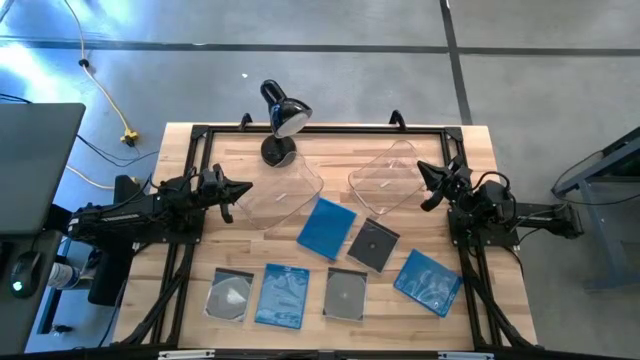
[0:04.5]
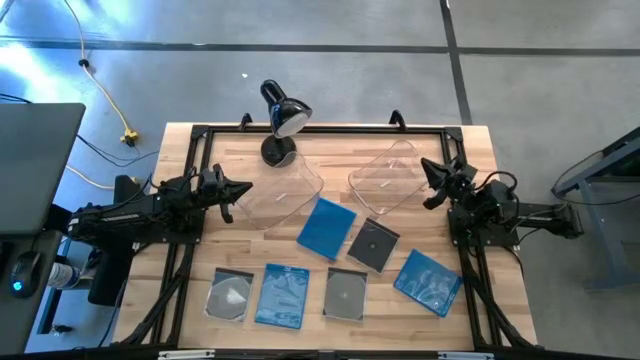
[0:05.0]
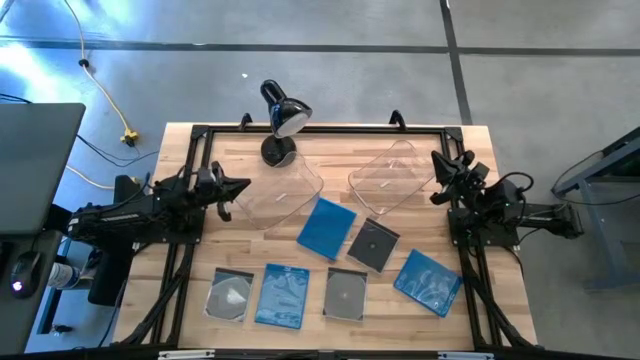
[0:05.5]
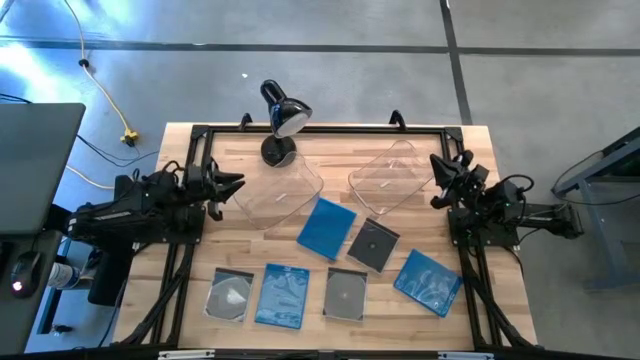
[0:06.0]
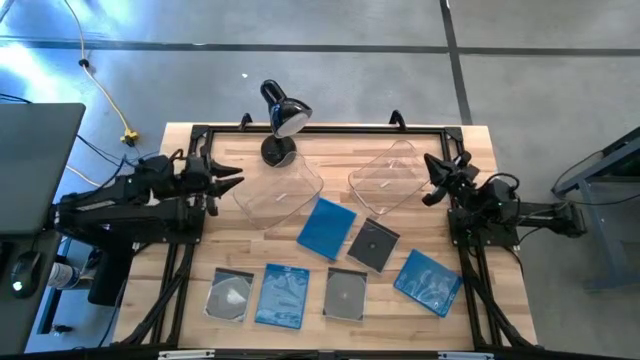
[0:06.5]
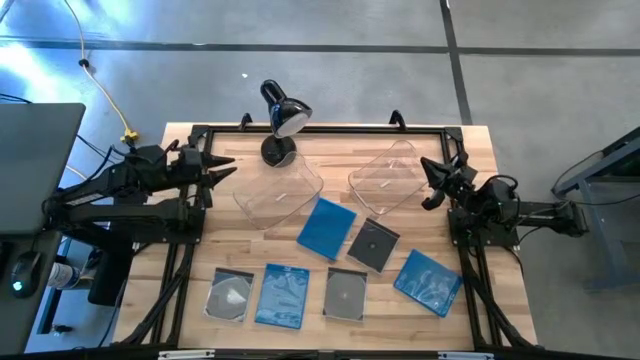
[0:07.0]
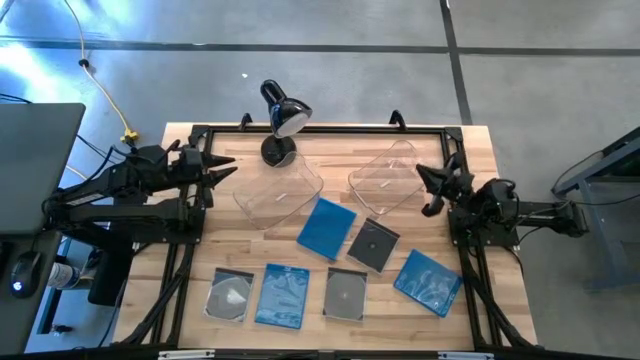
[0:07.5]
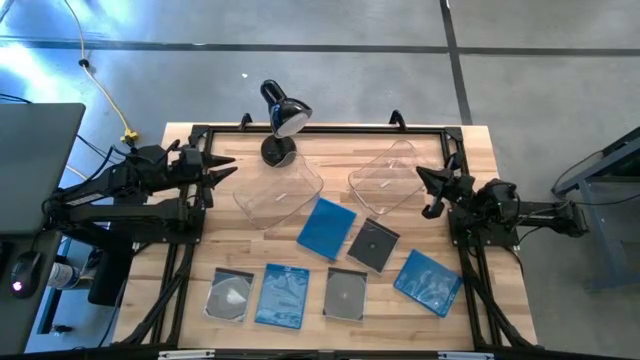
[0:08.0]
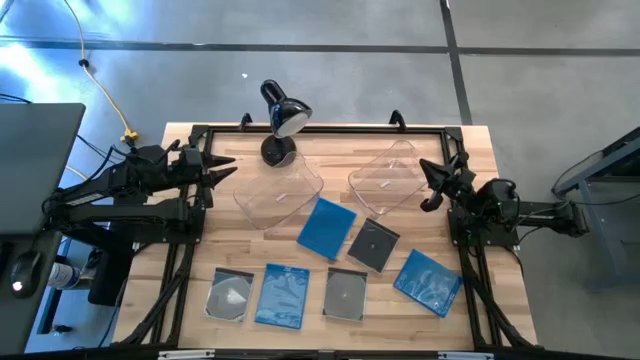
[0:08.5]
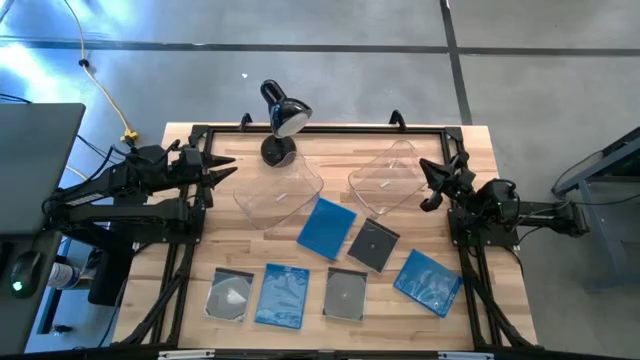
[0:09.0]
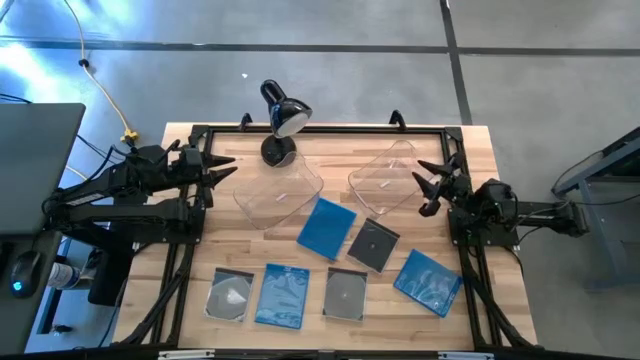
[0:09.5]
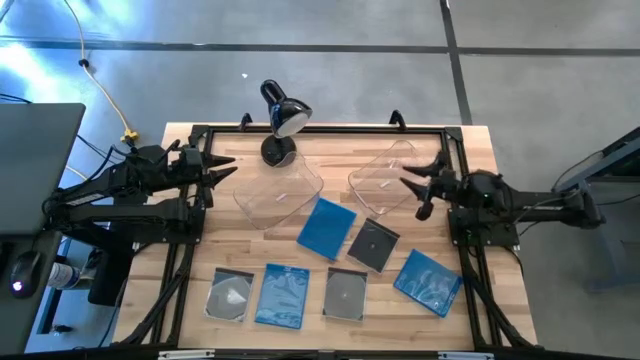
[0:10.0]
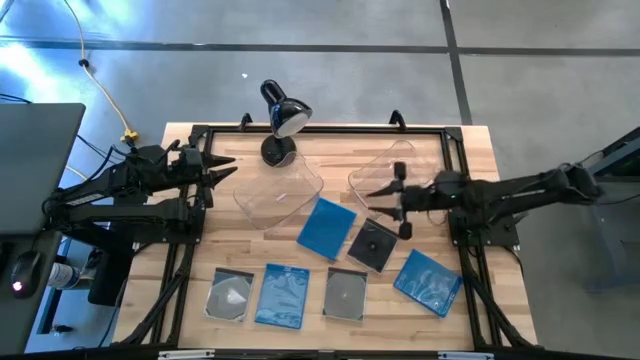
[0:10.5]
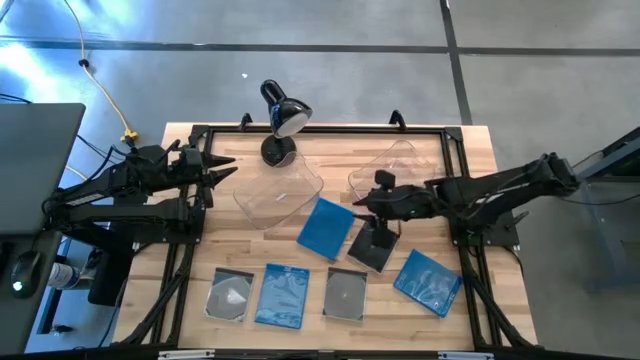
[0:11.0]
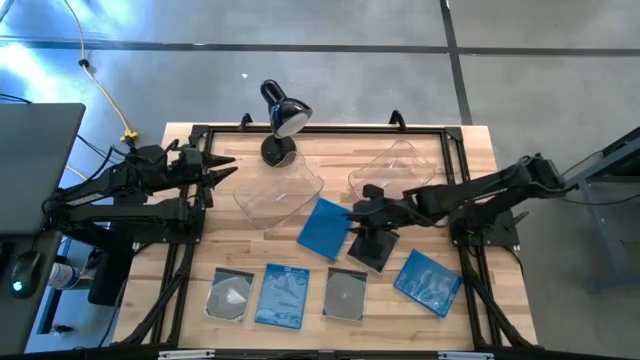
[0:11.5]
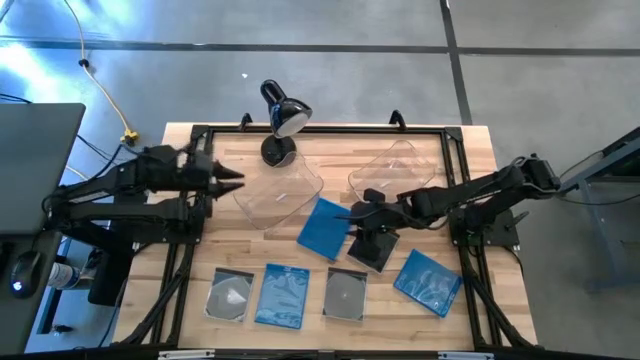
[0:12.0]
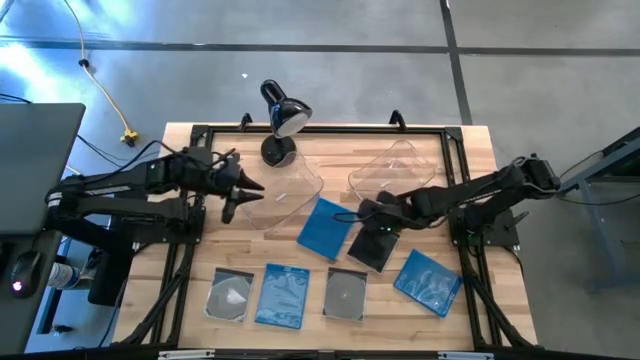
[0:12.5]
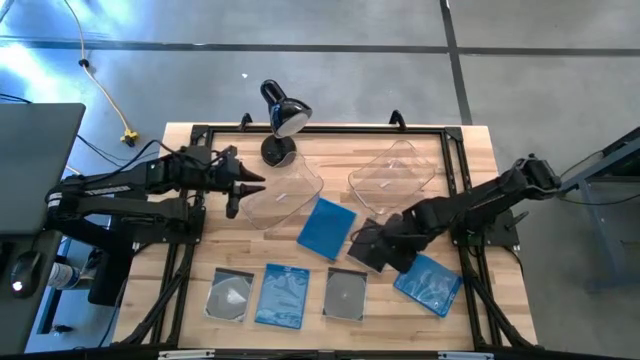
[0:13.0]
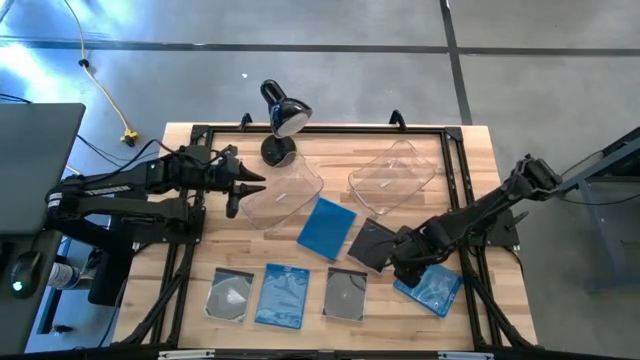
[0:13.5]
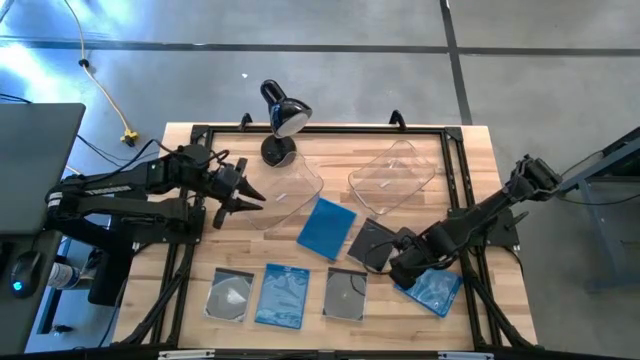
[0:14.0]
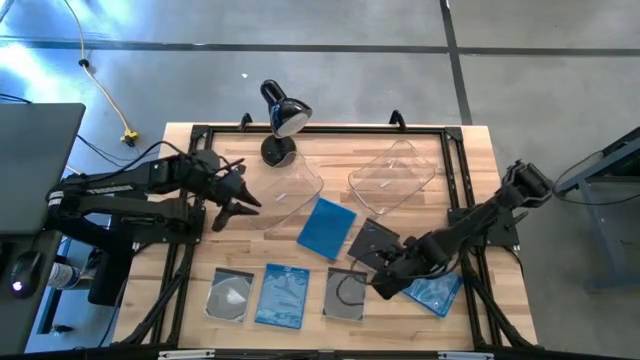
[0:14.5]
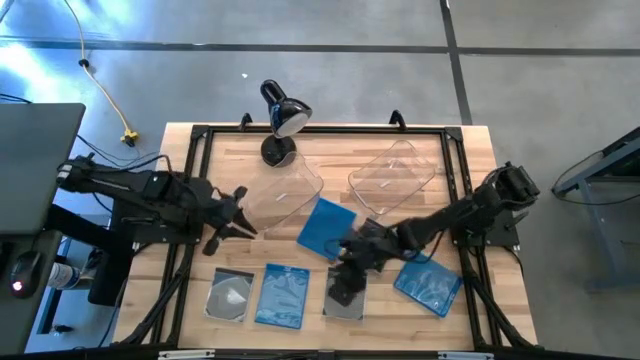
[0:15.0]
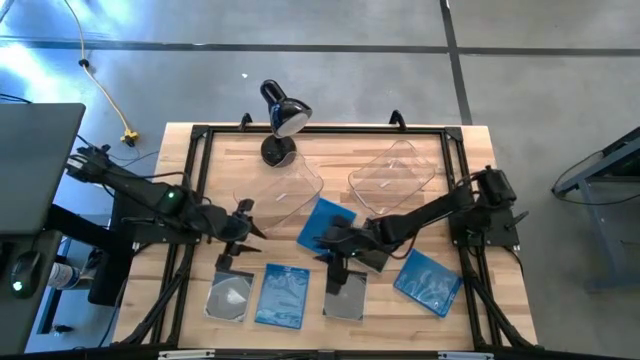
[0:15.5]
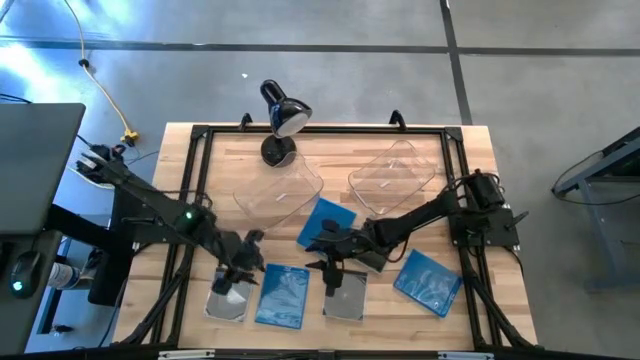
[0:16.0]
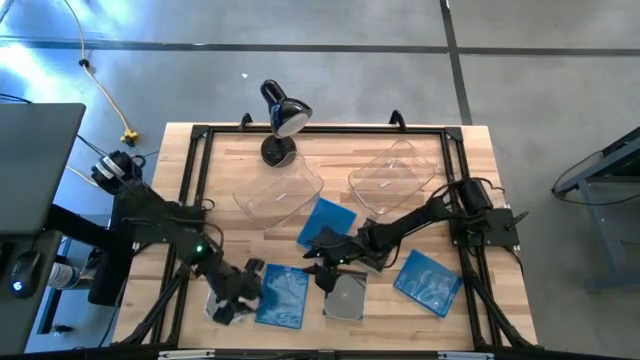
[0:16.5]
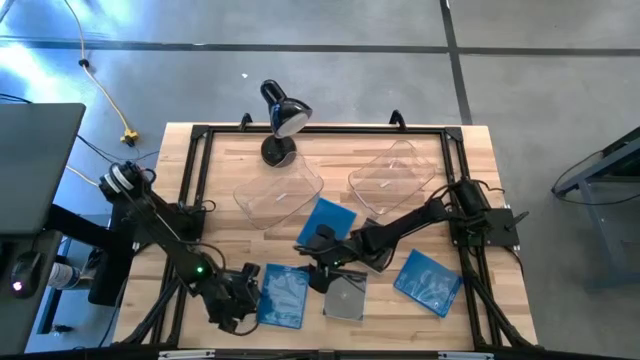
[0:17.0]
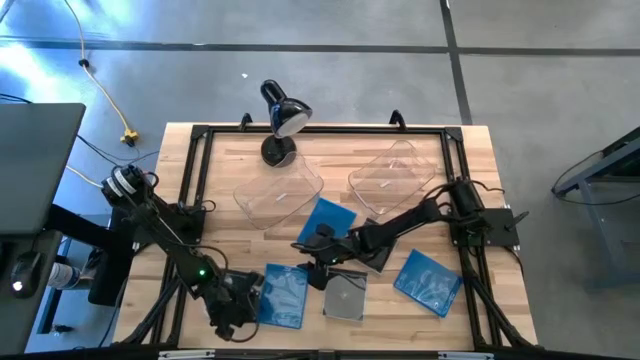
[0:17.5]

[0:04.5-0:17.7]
Task: Pick & place jewel cases by type
Put the bottom left blue CD case into the right transparent bin

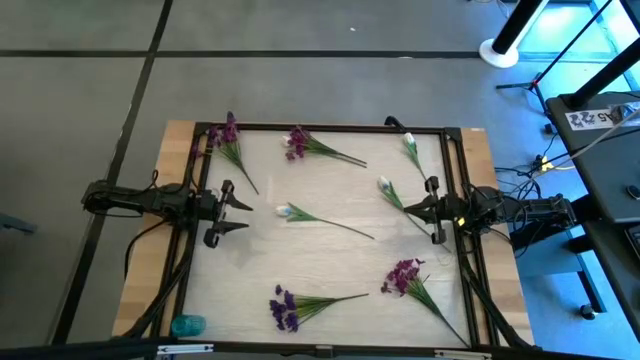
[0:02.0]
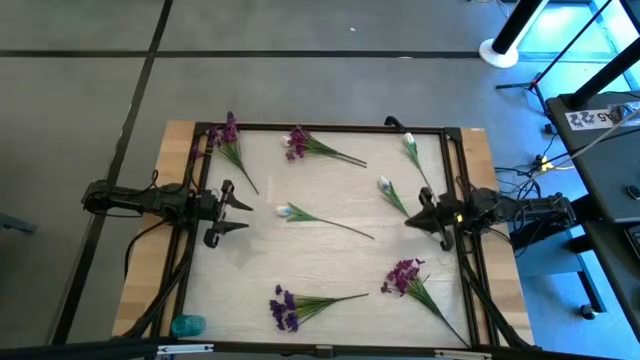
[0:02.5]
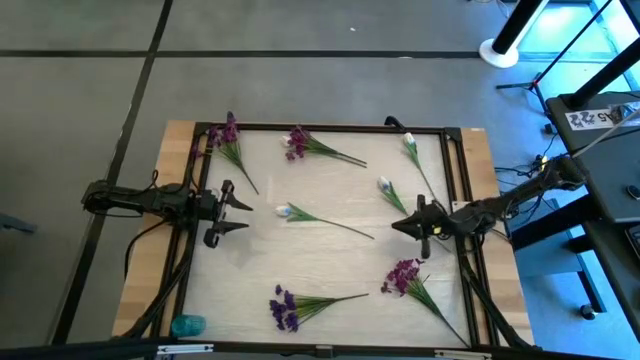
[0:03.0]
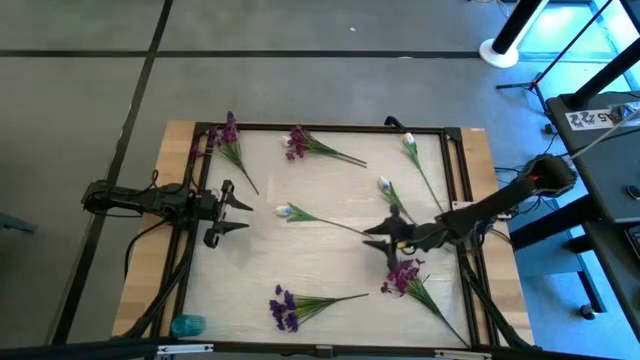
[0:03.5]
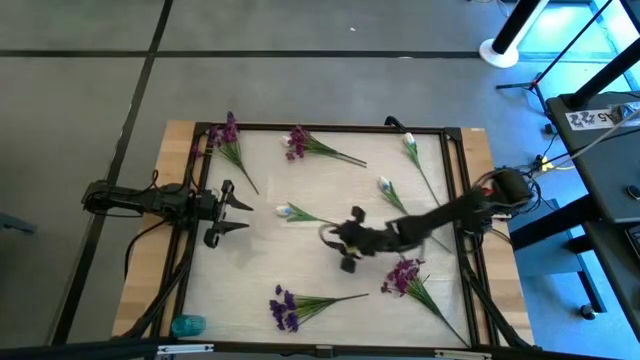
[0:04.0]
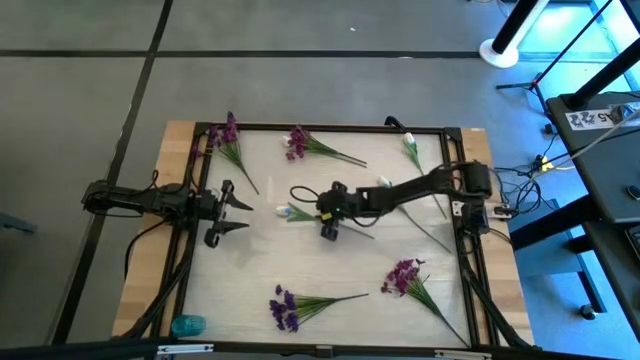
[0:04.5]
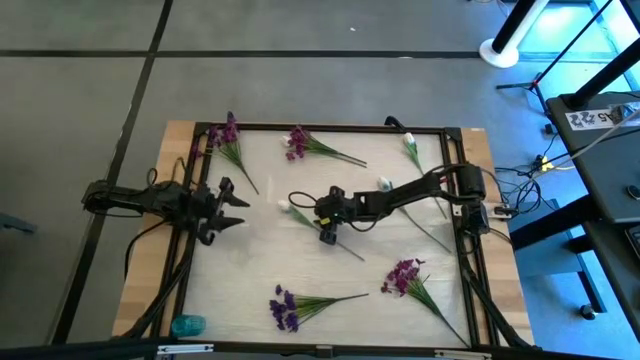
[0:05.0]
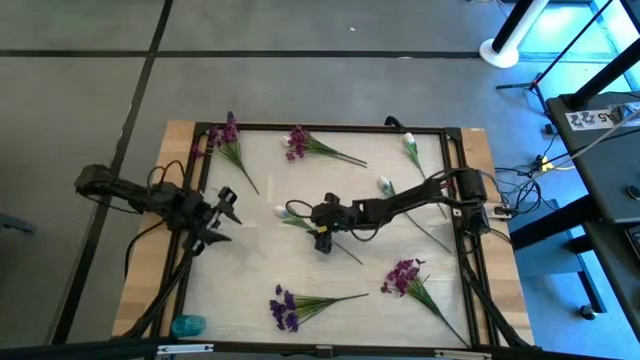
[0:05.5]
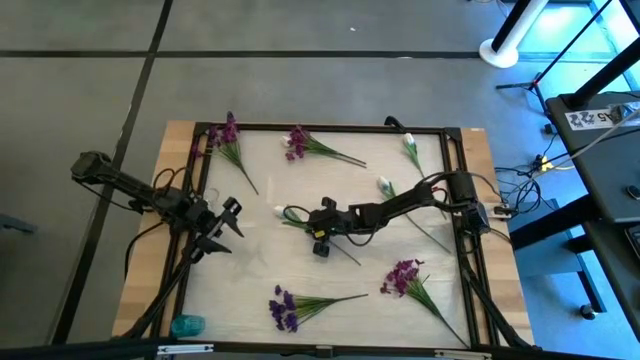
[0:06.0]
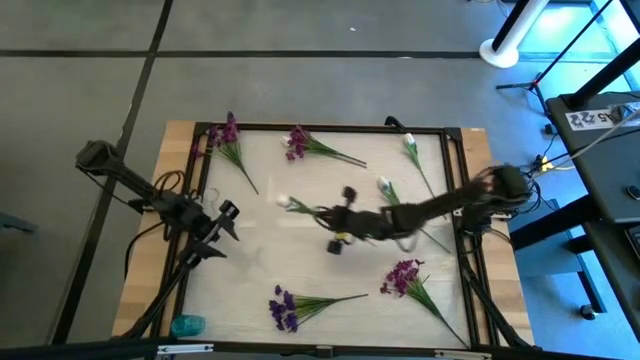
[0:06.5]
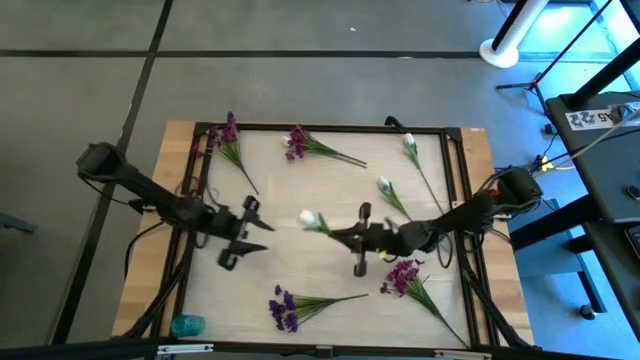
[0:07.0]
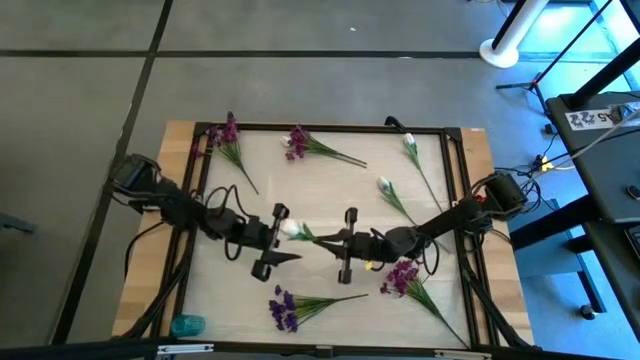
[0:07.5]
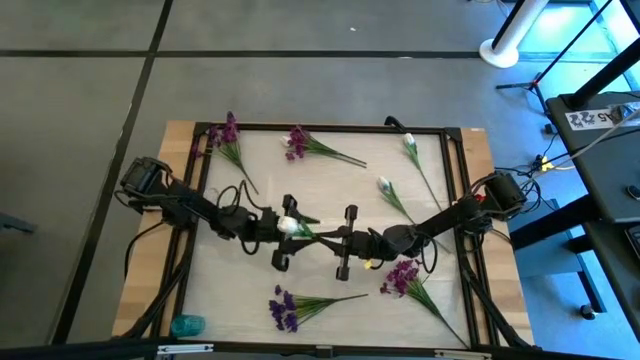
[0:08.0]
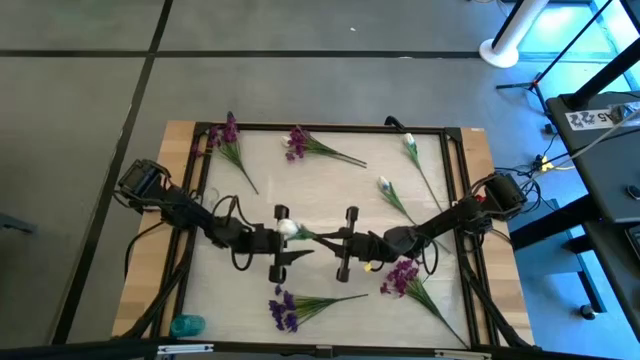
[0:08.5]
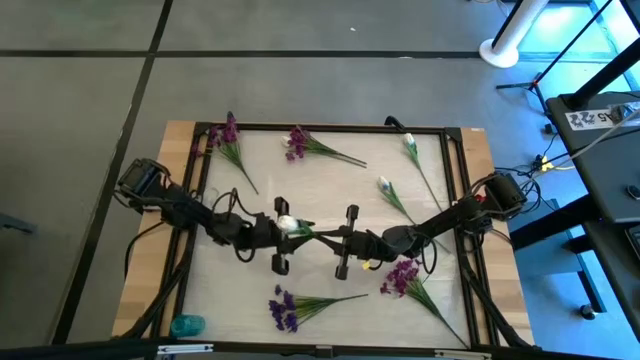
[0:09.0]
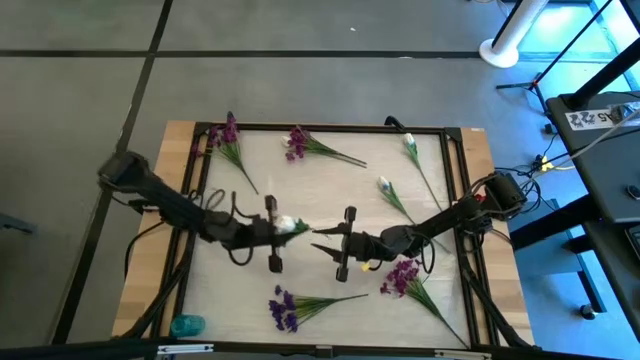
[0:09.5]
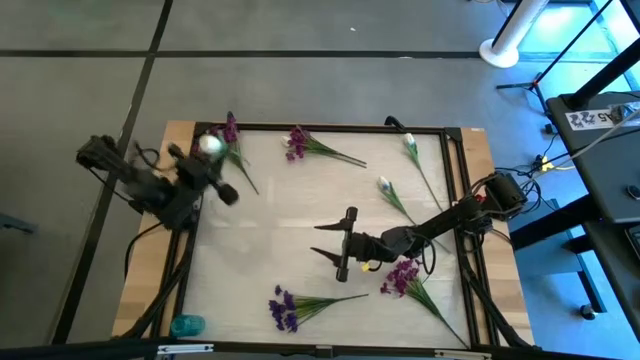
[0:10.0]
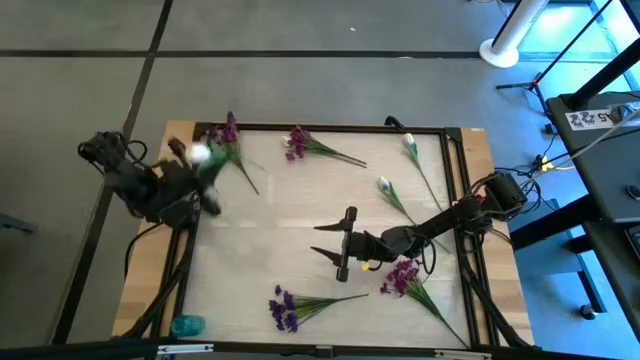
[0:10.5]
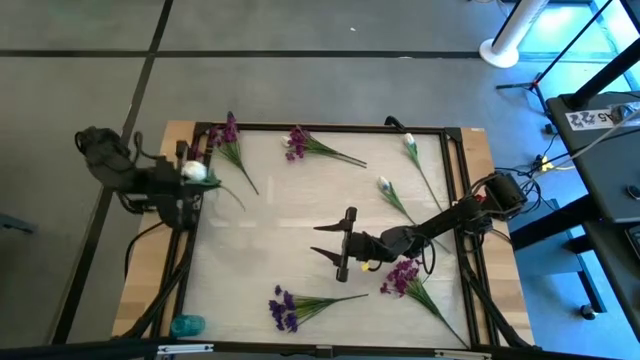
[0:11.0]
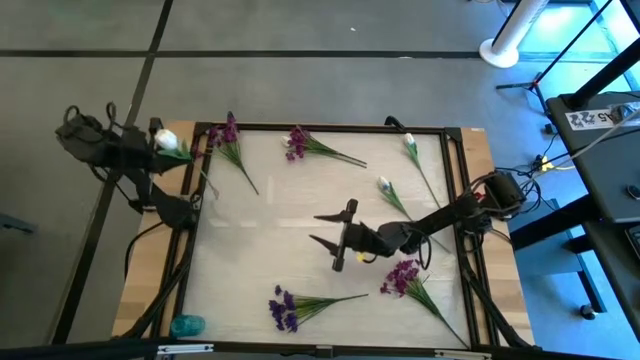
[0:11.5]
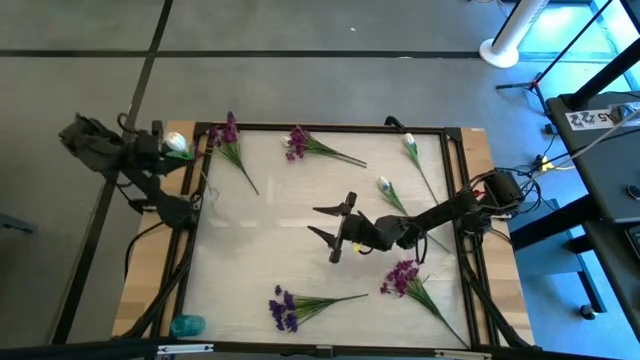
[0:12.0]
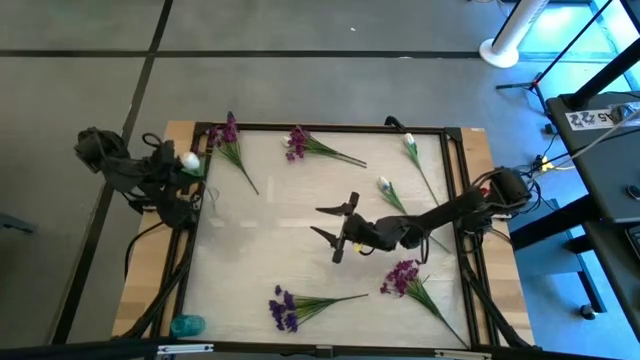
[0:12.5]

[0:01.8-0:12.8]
Task: Sort flowers into vase by color
Put the white flower into the transparent vase
